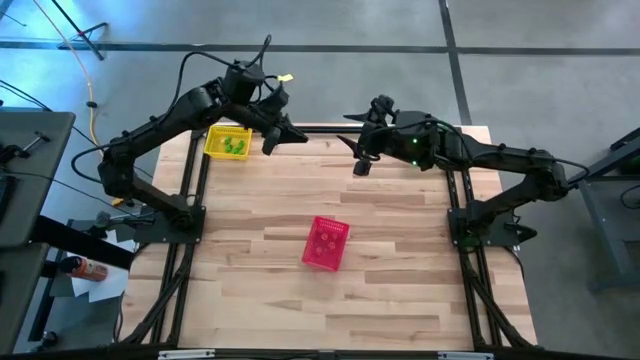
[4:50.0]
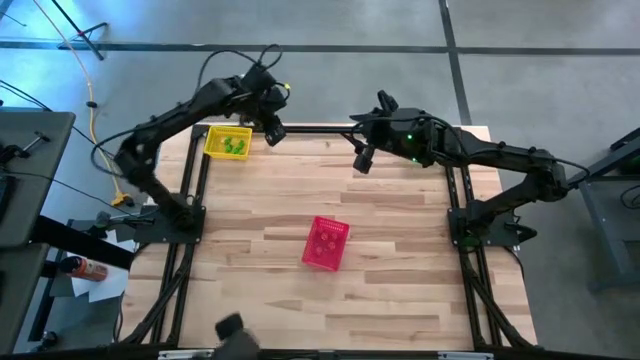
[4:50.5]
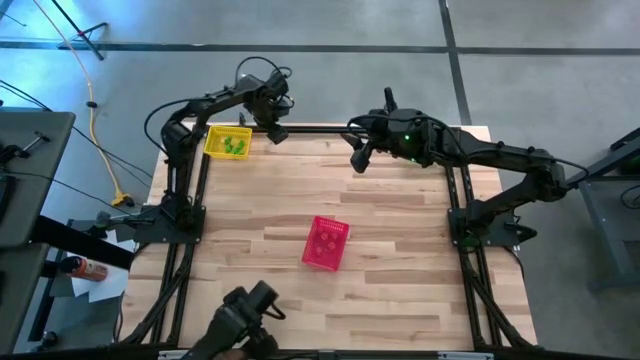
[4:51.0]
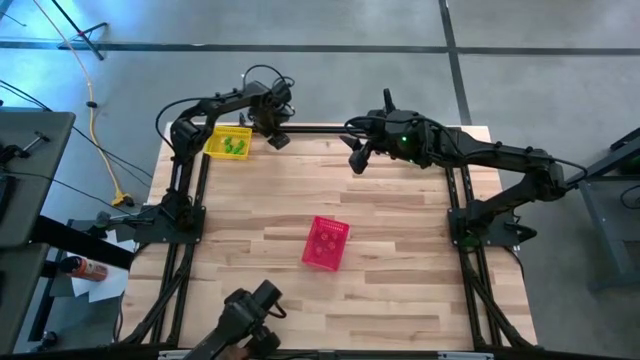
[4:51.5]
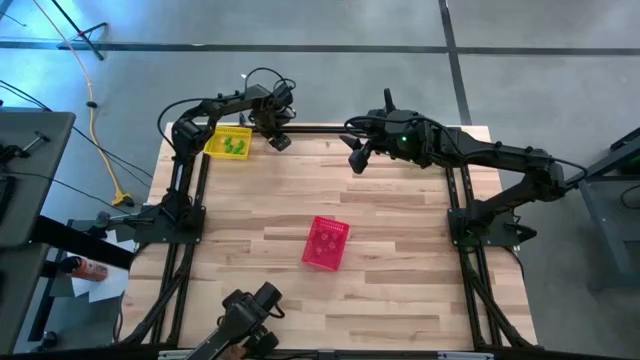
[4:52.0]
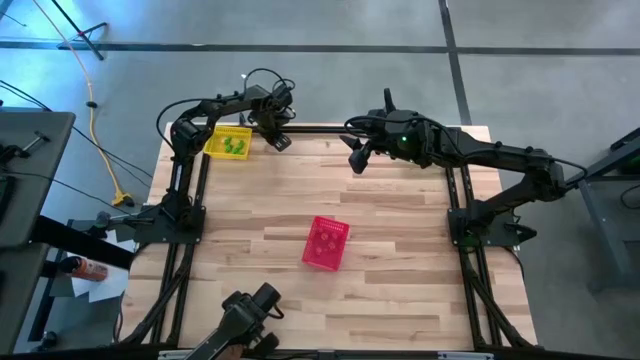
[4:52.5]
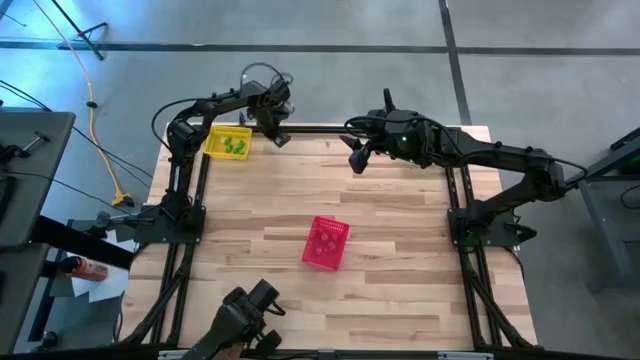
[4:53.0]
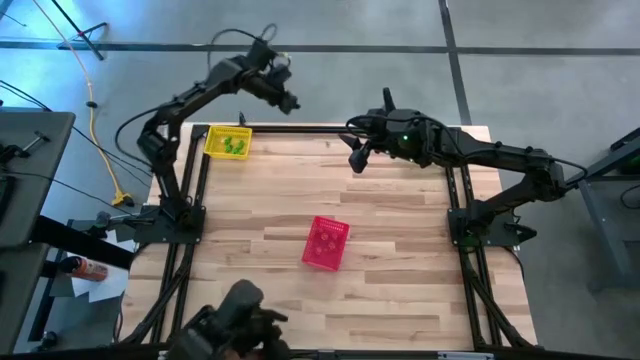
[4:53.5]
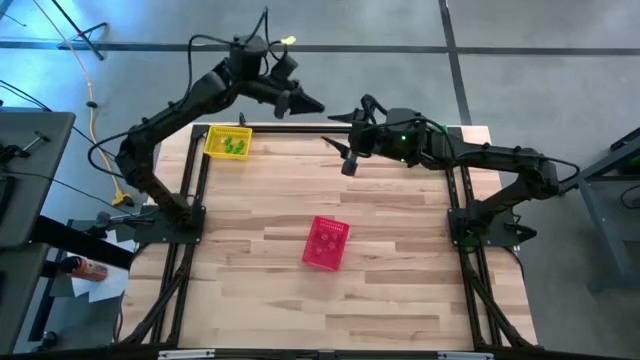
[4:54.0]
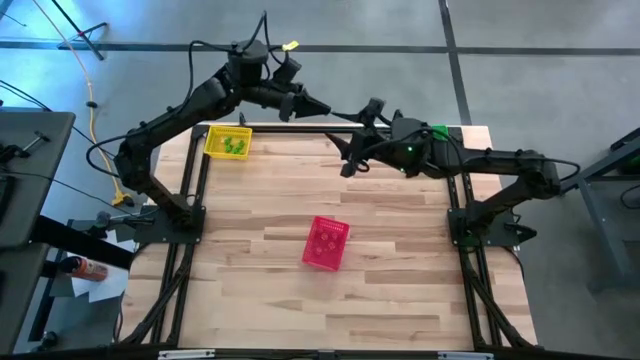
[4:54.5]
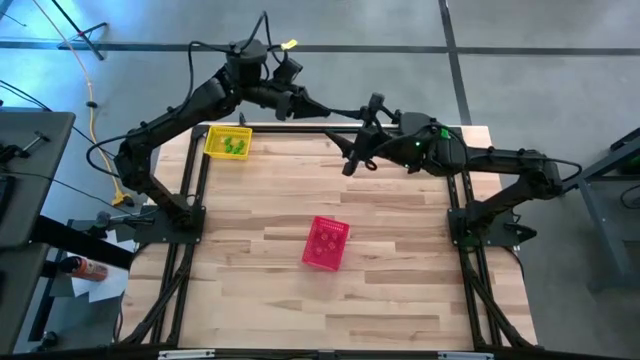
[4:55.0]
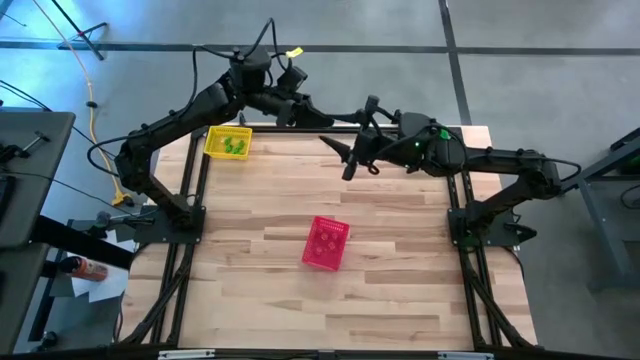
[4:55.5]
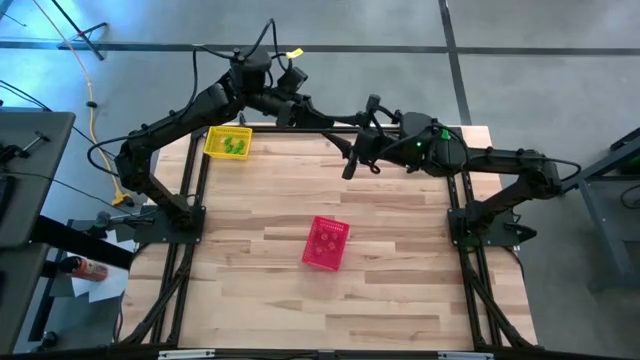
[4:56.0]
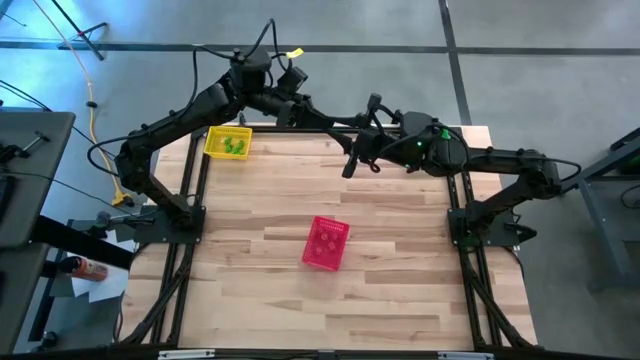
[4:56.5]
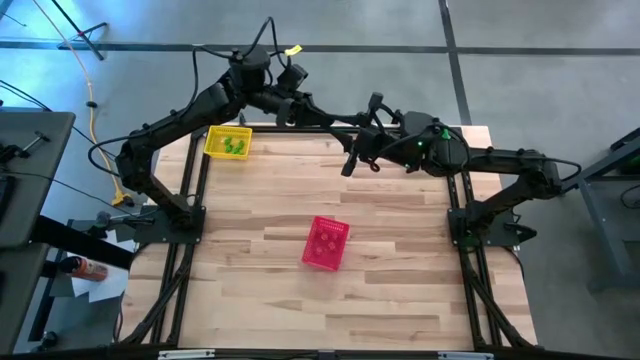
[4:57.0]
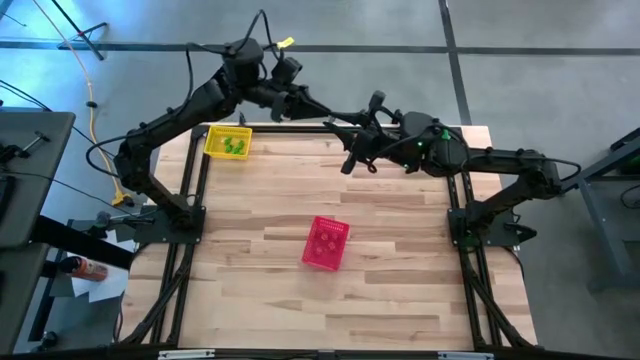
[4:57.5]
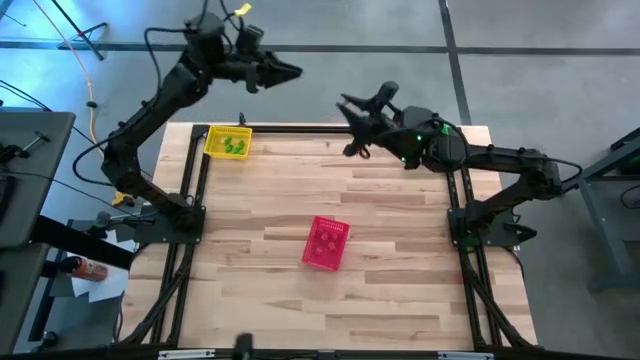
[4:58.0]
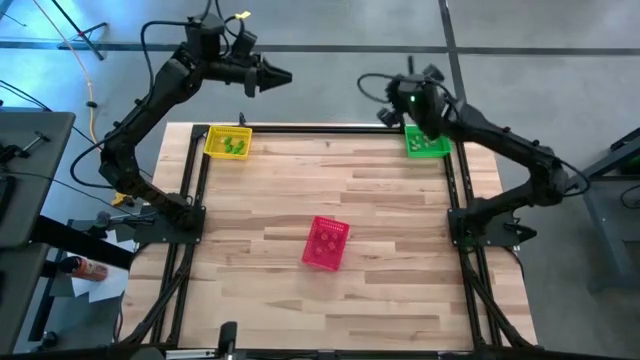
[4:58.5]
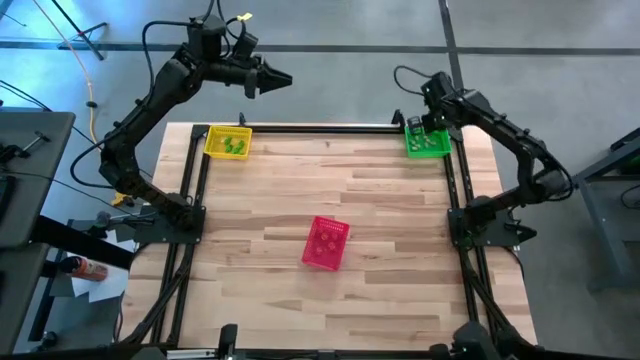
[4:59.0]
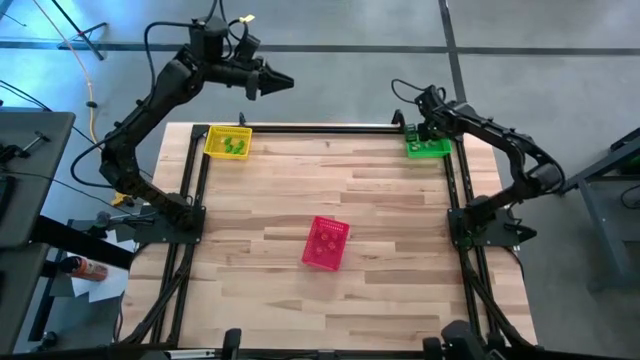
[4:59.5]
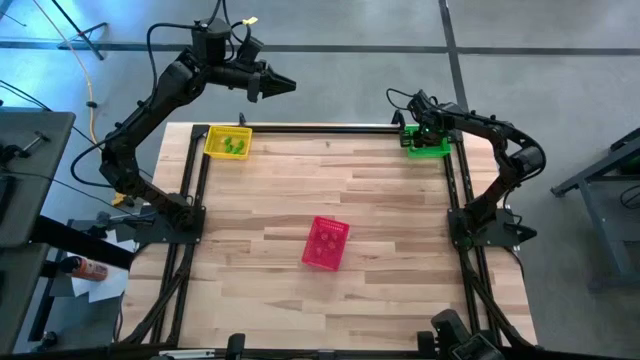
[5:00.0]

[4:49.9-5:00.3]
Task: Sort Halloween decoration
Put the white skull toy into the green bin

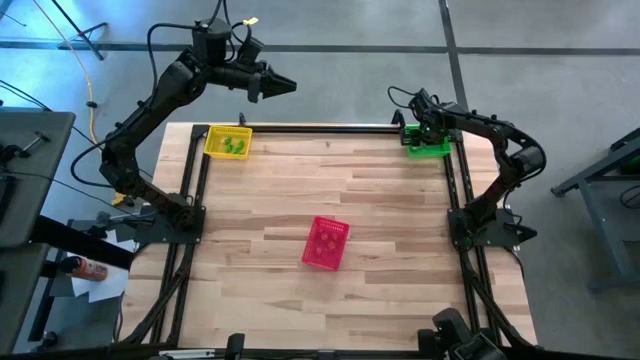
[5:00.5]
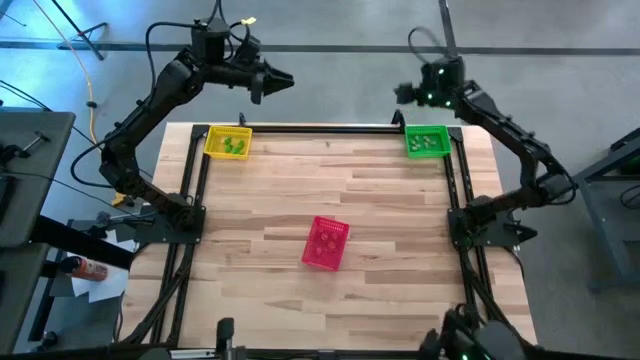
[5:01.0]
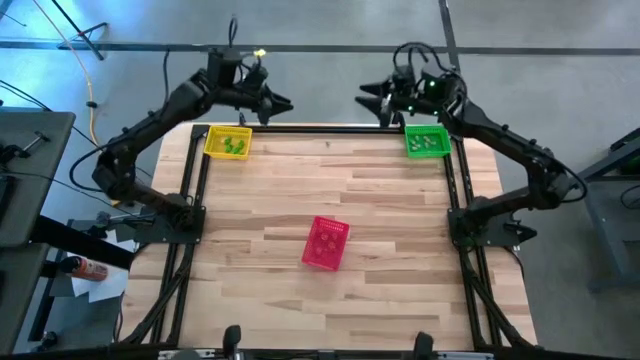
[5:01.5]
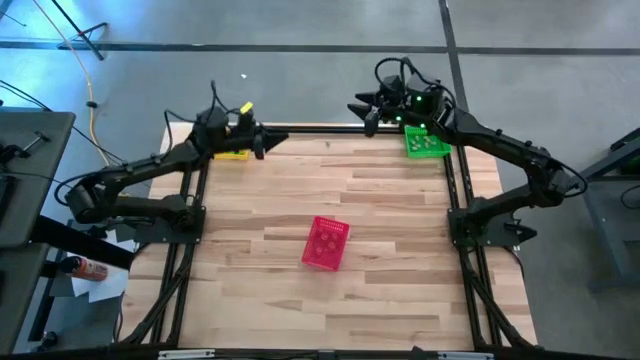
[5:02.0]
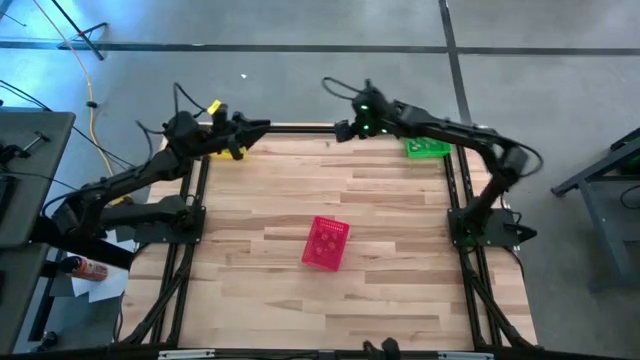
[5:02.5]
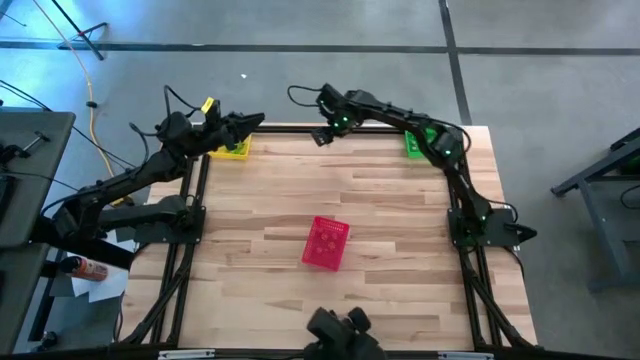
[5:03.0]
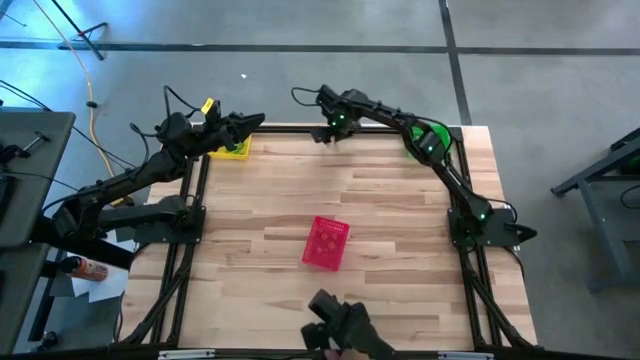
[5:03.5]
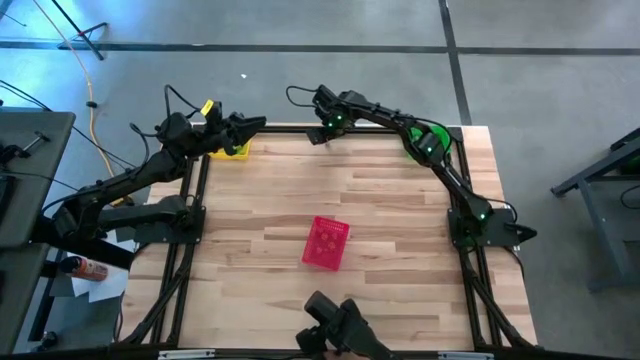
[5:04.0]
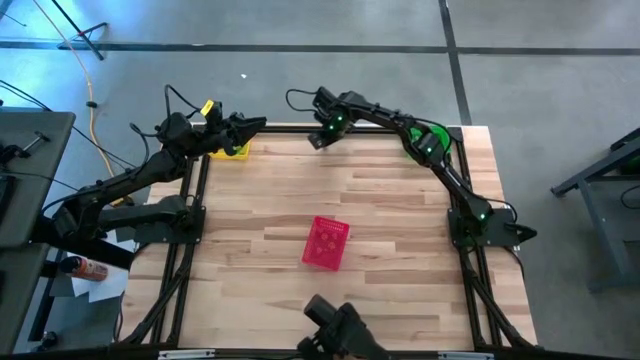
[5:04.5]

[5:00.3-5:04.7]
Put the white skull toy into the green bin

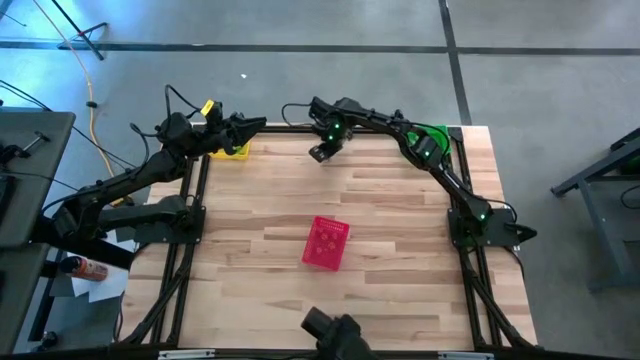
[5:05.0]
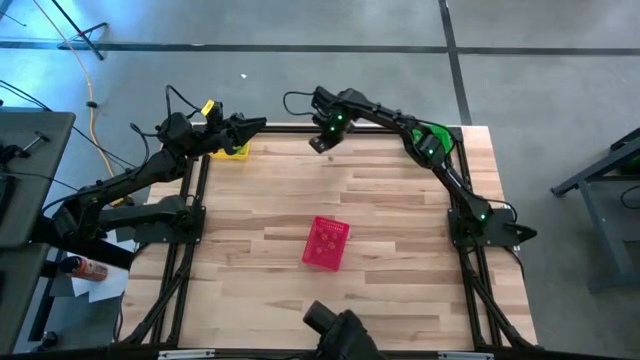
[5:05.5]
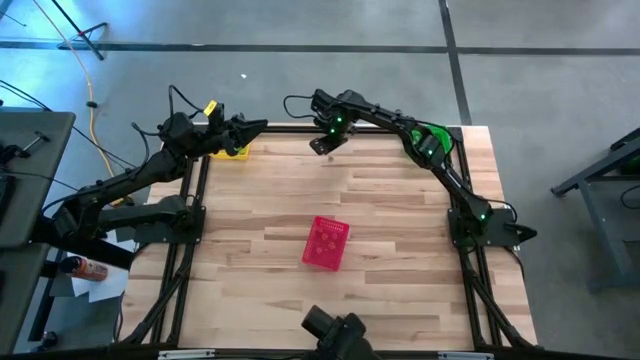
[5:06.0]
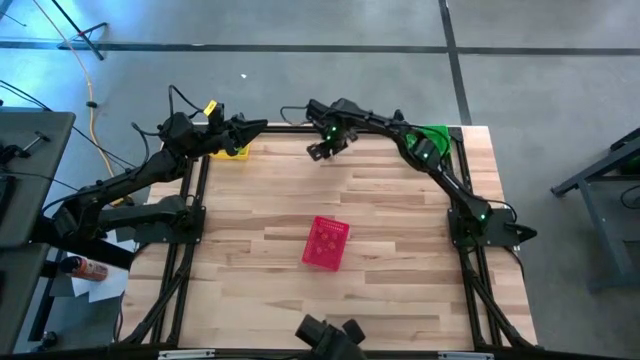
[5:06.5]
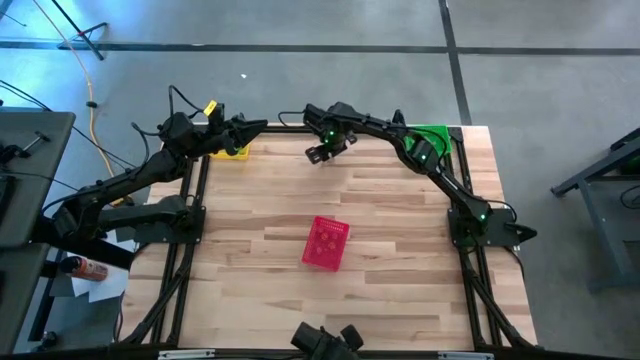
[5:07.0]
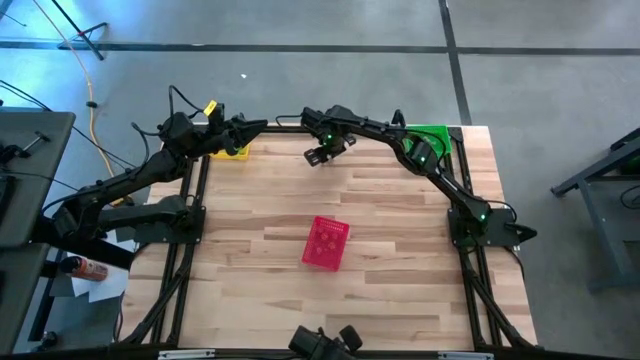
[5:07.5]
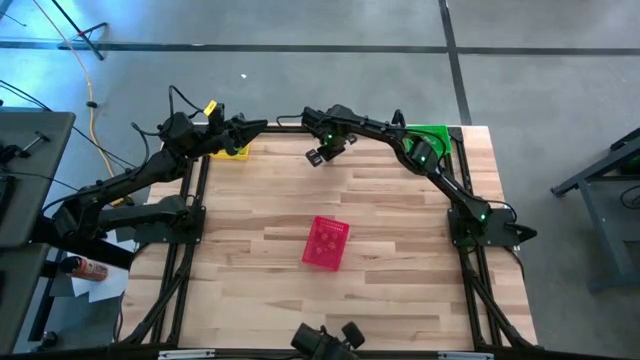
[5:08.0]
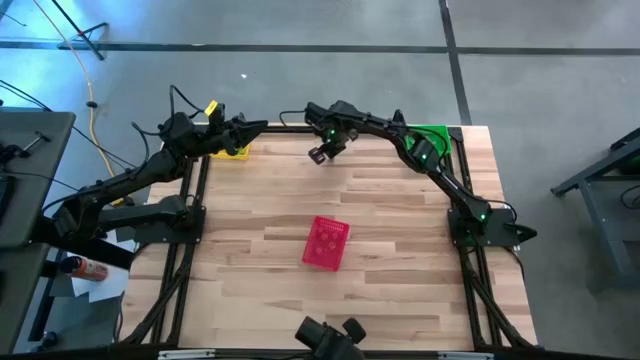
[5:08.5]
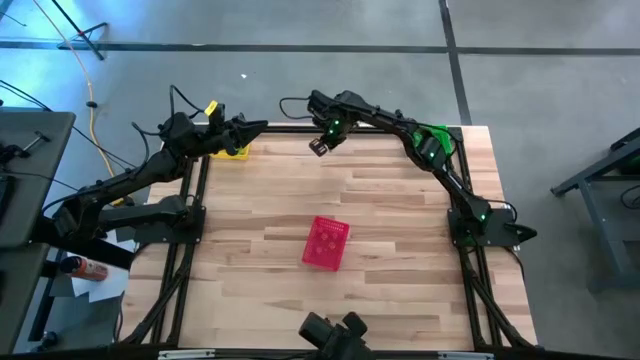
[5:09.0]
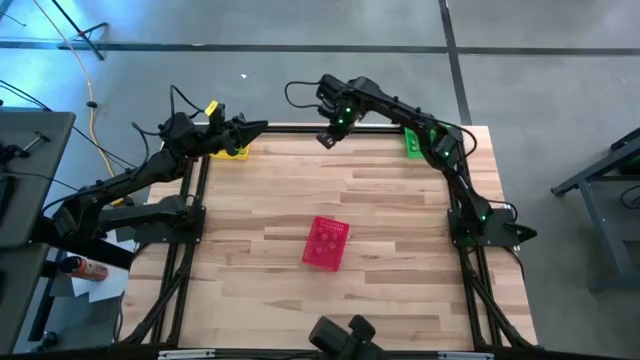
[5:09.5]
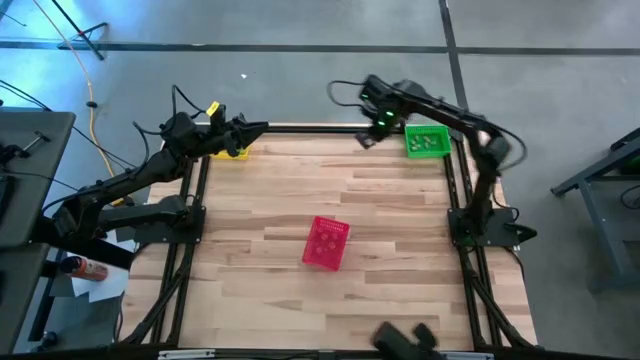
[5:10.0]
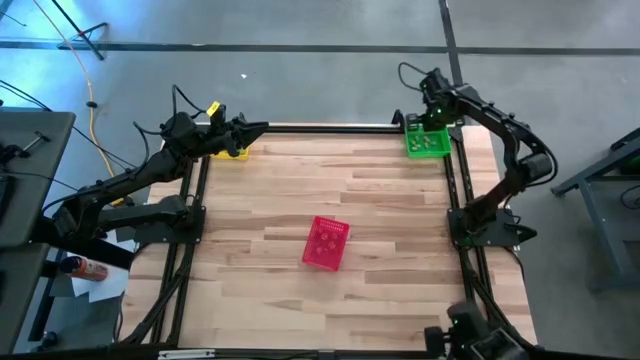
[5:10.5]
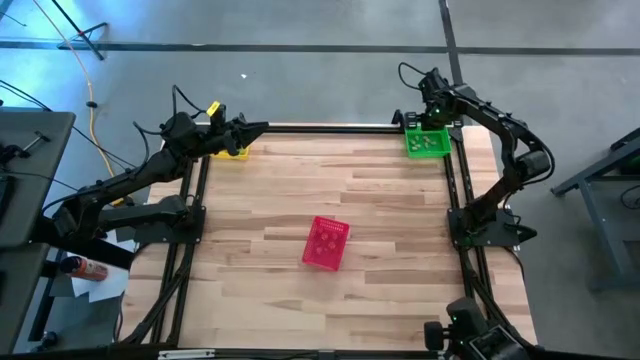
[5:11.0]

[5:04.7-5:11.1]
Put the white skull toy into the green bin
